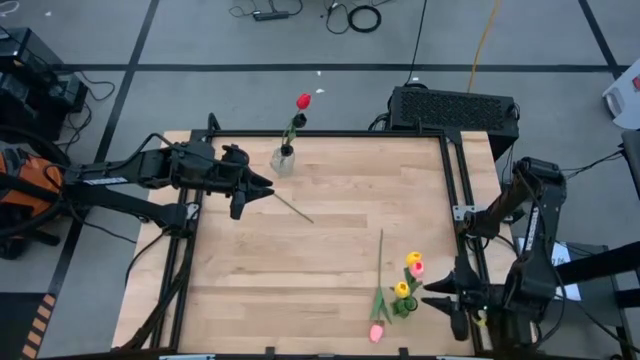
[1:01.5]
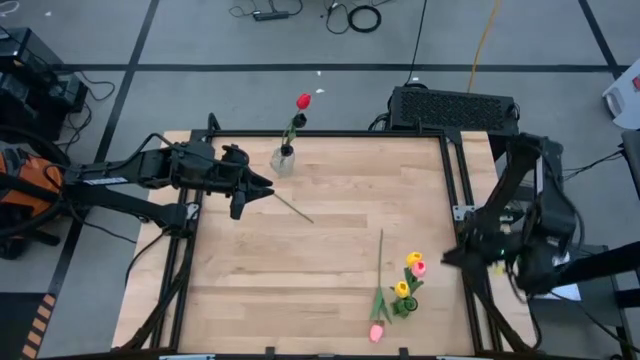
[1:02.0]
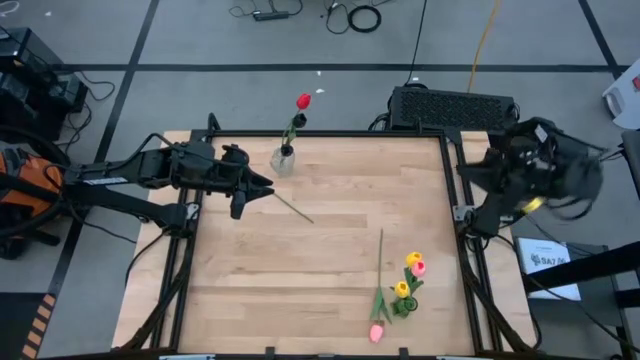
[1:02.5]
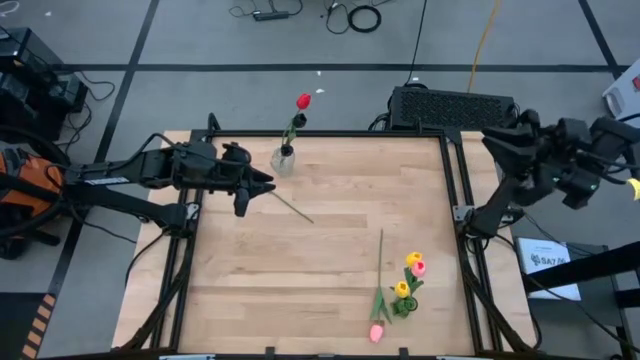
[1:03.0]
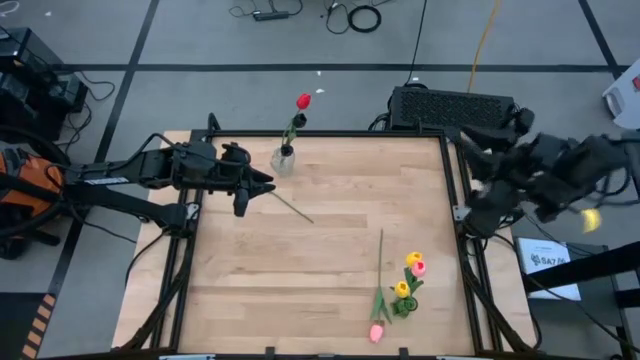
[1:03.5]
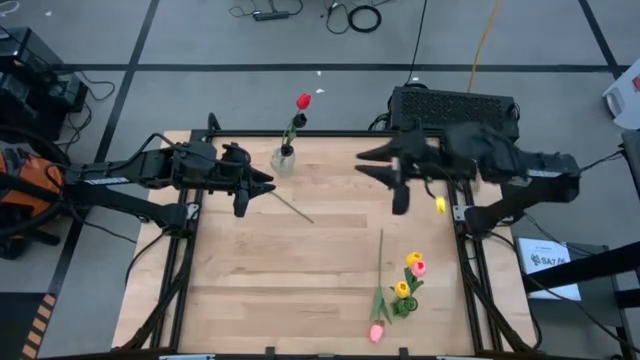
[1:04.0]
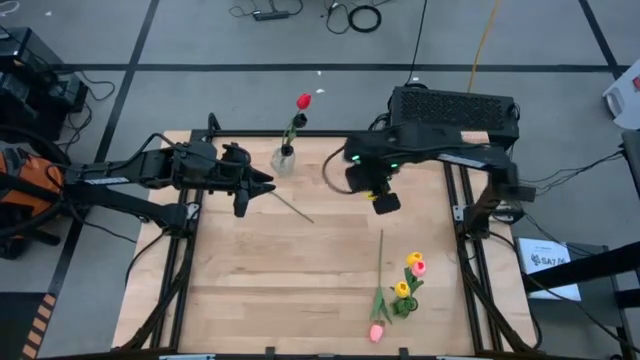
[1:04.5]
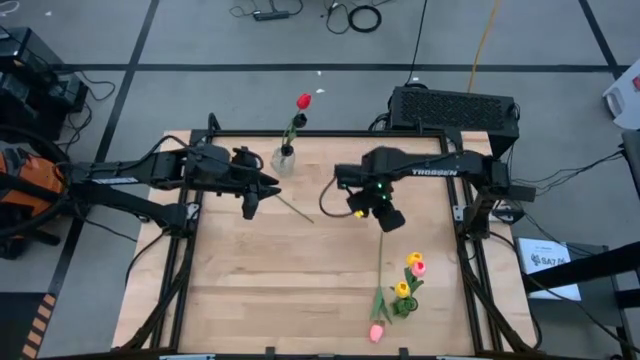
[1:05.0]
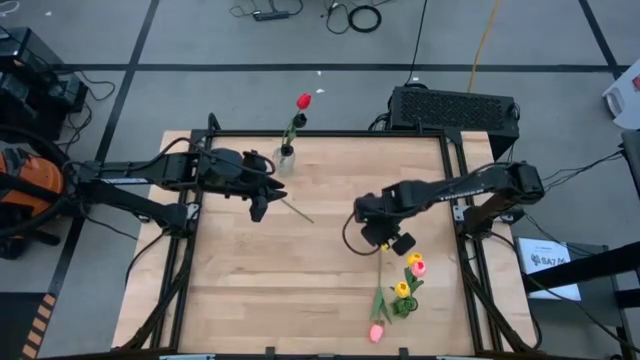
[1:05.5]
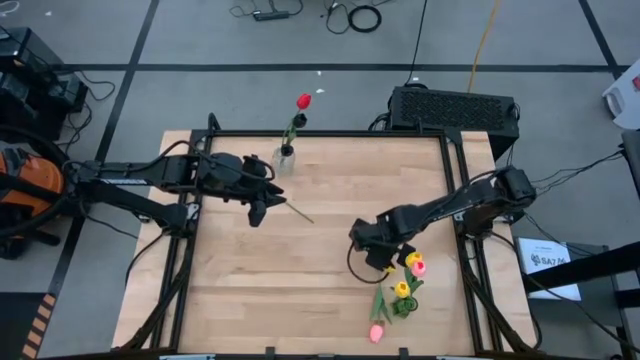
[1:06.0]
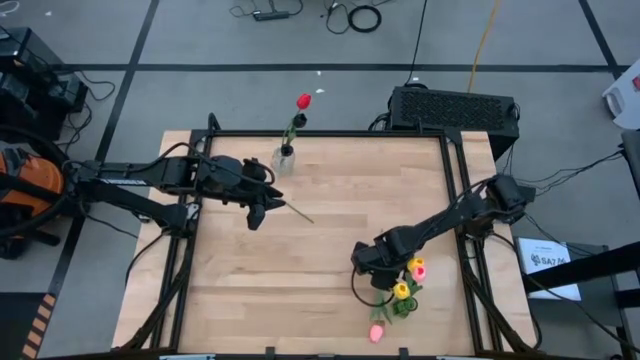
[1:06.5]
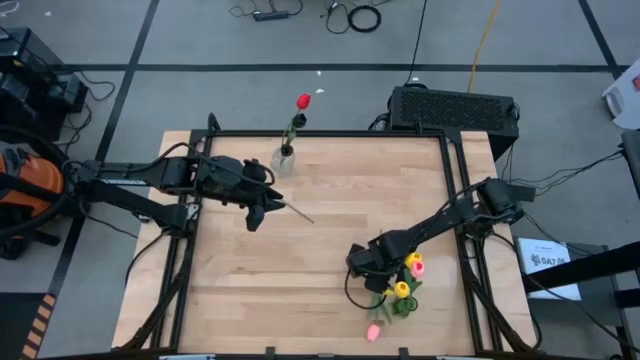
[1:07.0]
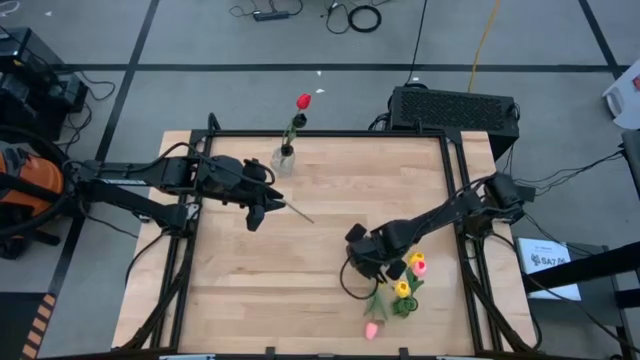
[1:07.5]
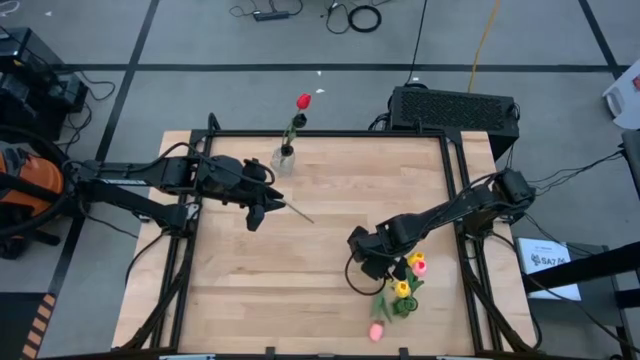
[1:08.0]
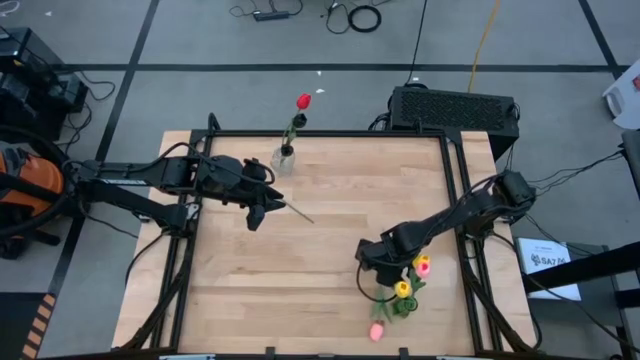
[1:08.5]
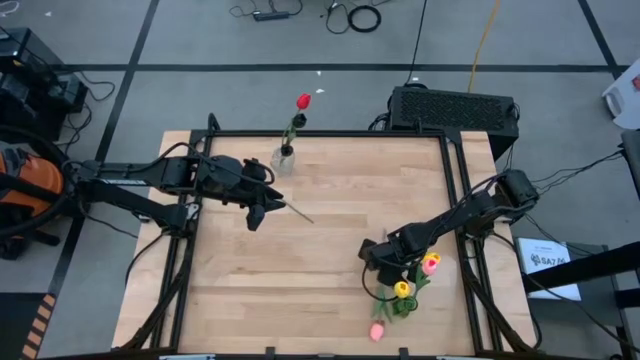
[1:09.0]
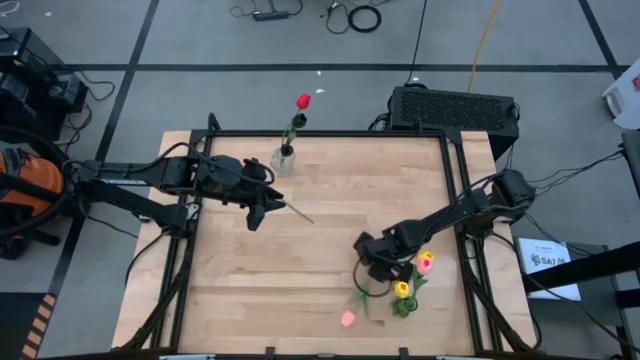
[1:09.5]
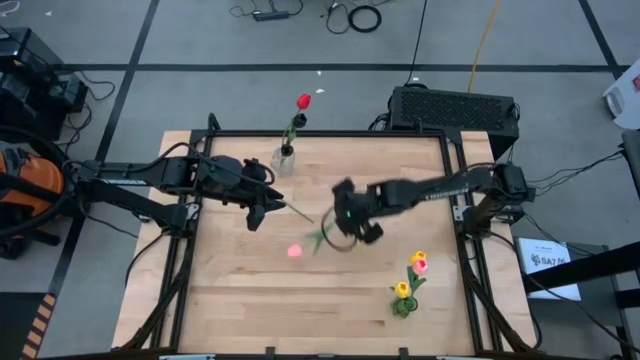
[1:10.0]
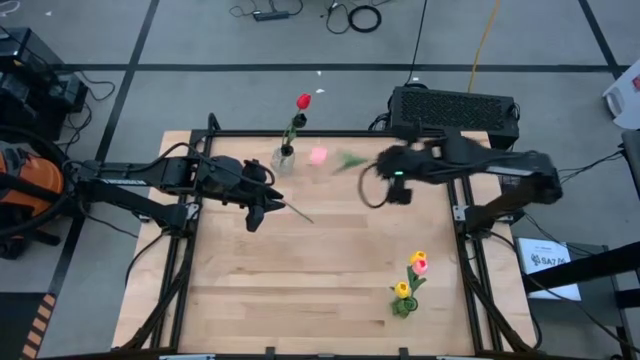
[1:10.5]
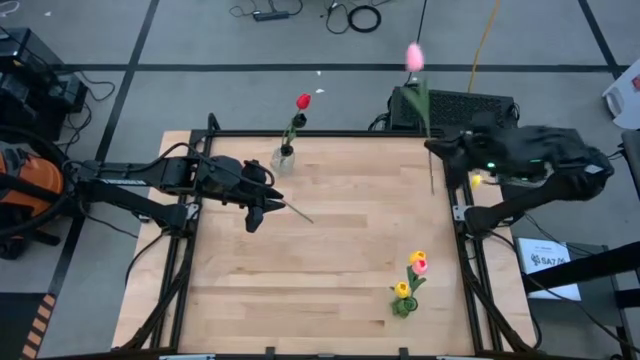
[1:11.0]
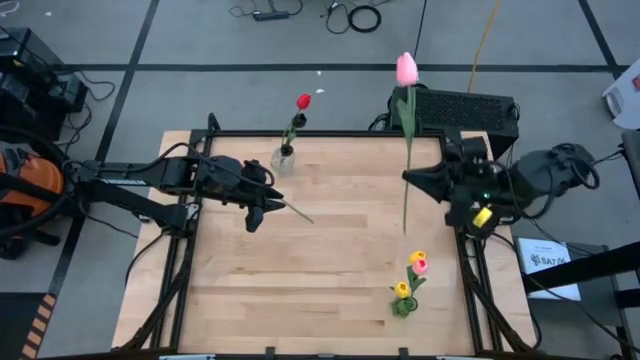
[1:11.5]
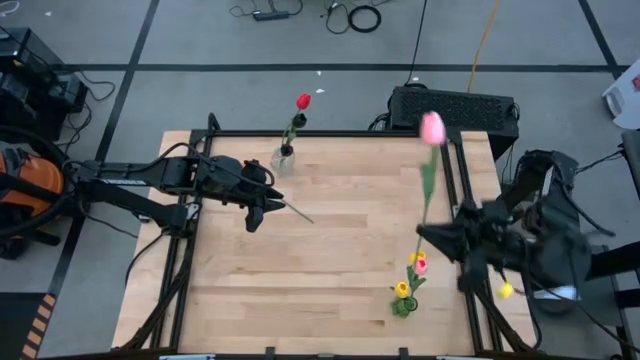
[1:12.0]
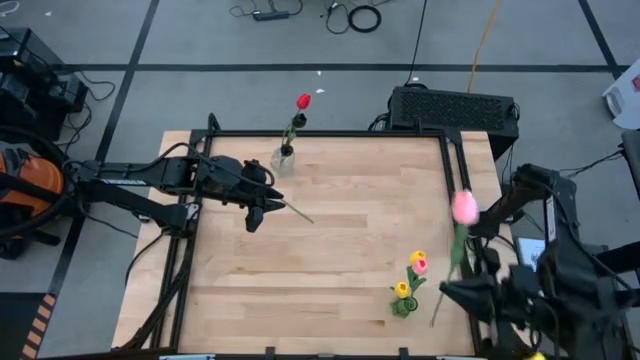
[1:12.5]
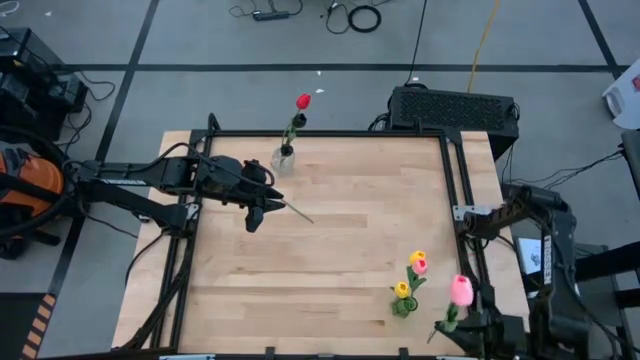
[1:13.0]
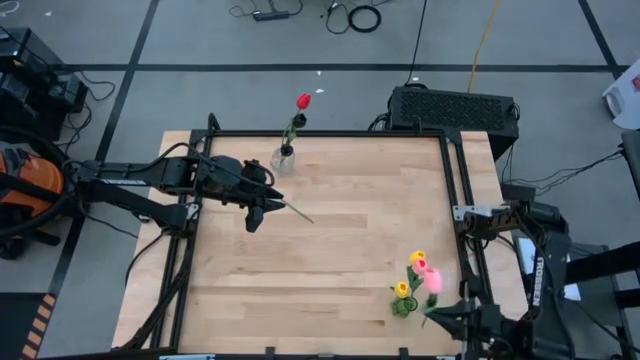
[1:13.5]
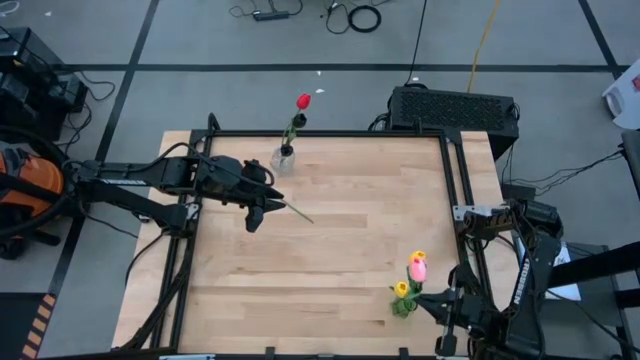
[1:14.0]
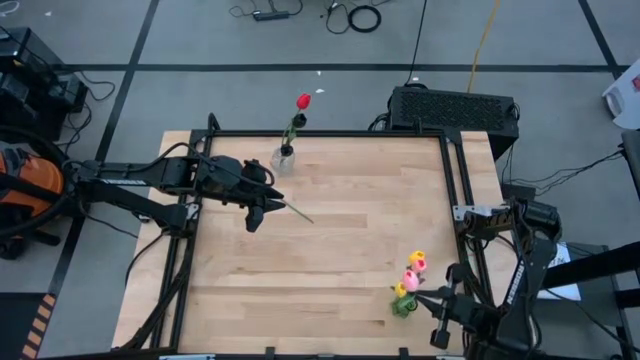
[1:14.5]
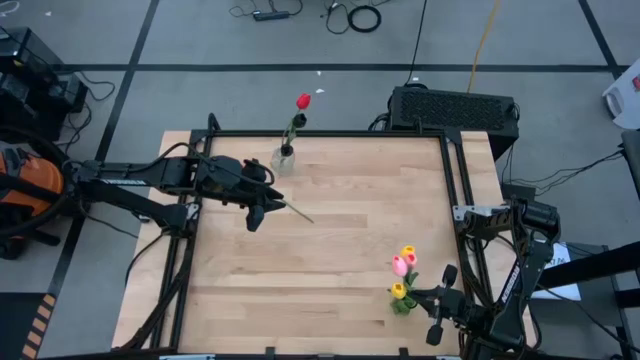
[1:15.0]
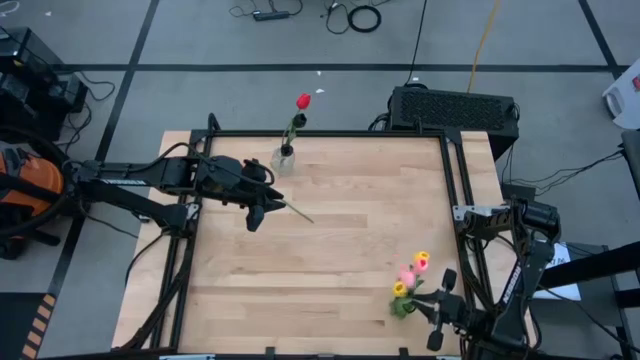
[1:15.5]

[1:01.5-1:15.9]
Task: Sort flowers into vase by color
Put the pink tulip into the green flower vase

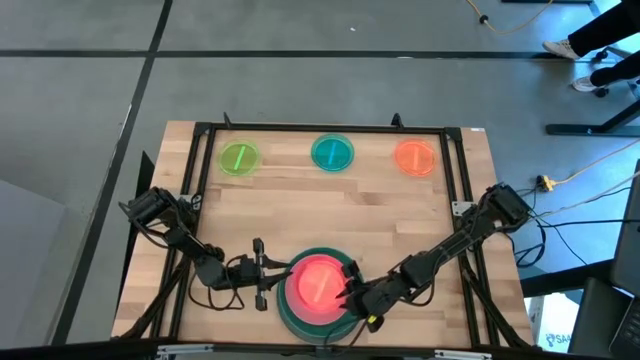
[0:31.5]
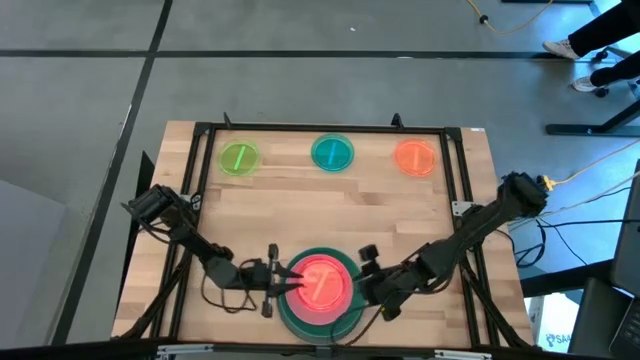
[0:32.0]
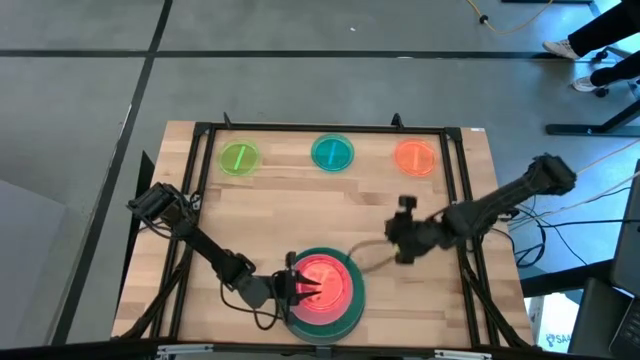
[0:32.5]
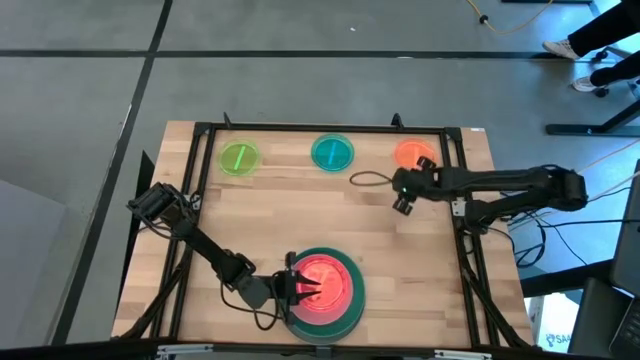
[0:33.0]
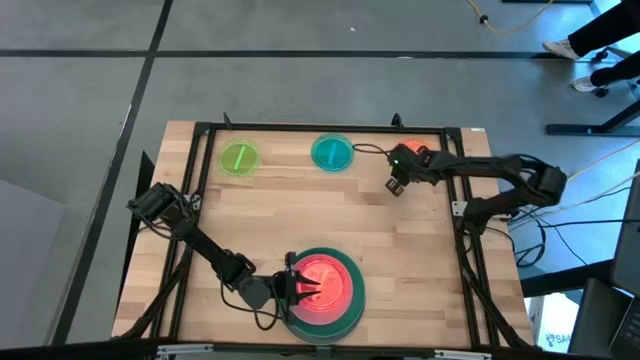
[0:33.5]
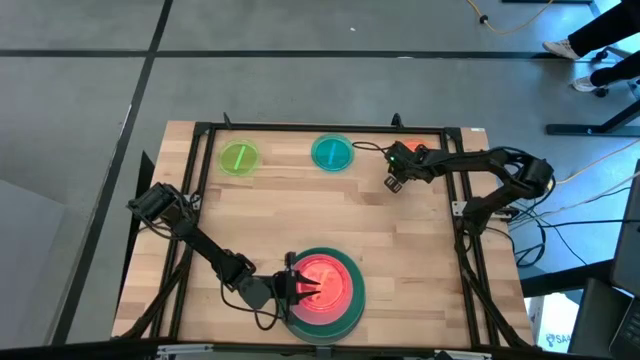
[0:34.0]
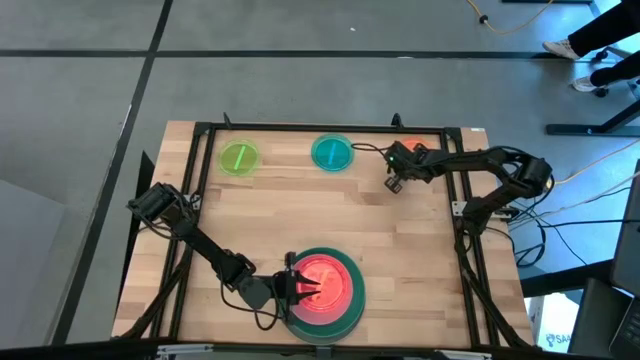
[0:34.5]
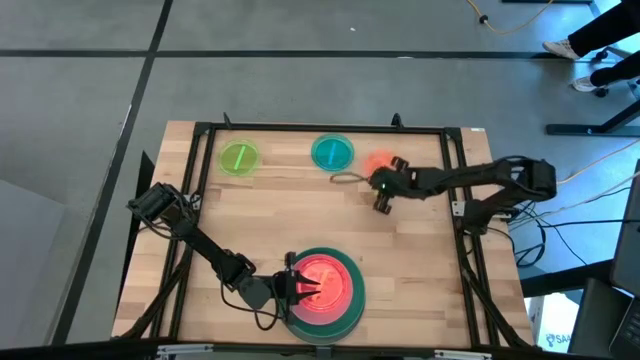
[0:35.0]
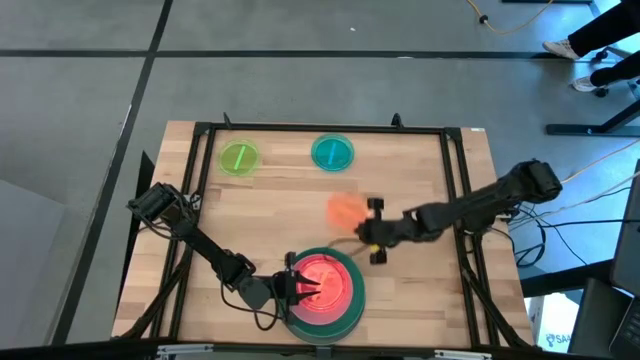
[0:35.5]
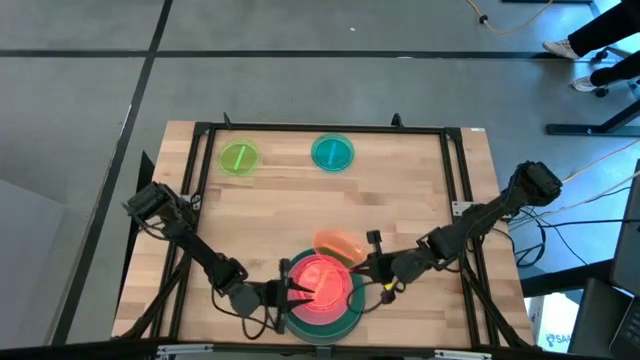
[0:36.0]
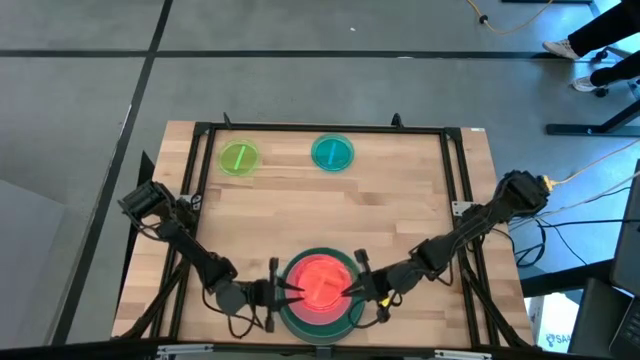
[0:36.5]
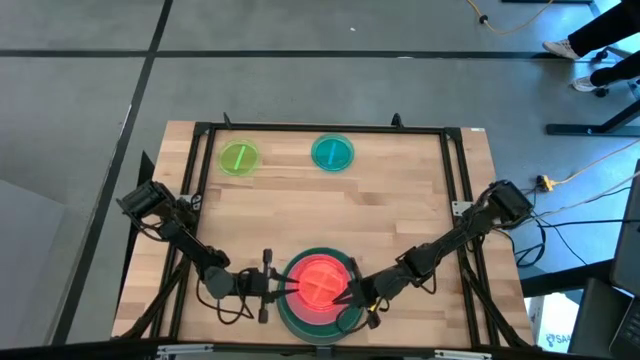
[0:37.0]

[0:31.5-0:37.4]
Task: Stack plastic plates
Stack the light orange plate on top of the light orange plate
